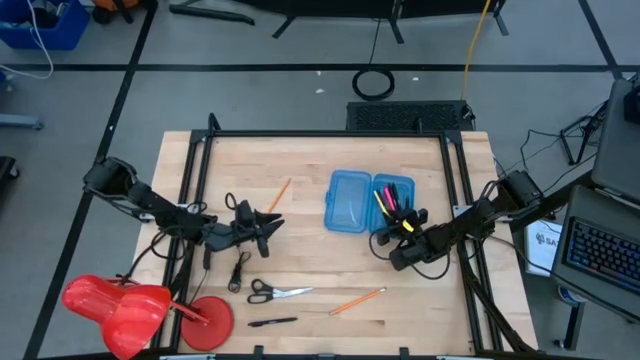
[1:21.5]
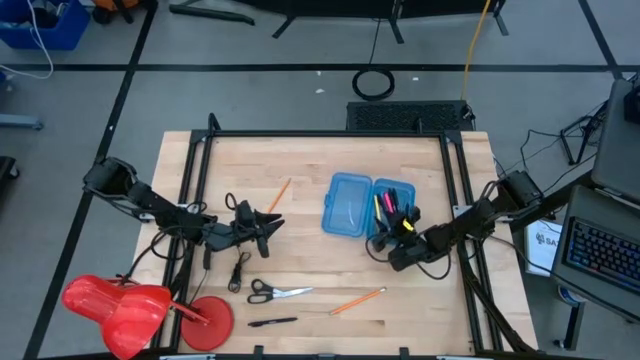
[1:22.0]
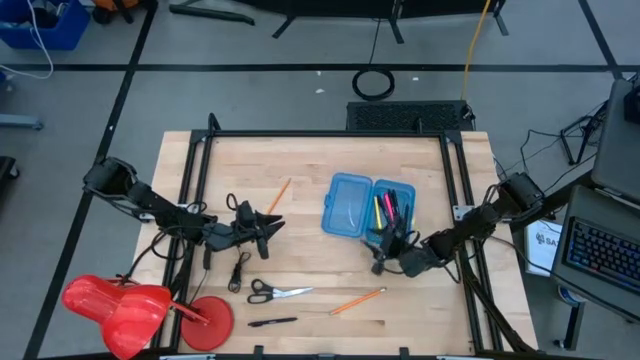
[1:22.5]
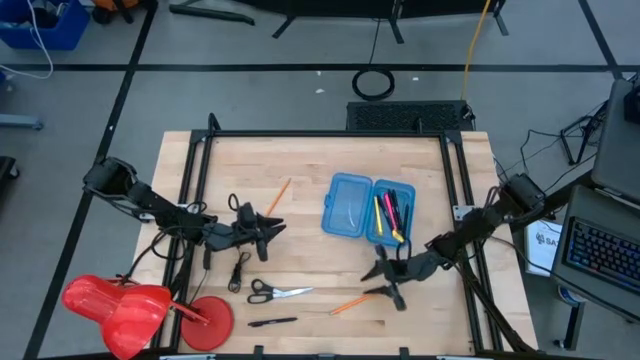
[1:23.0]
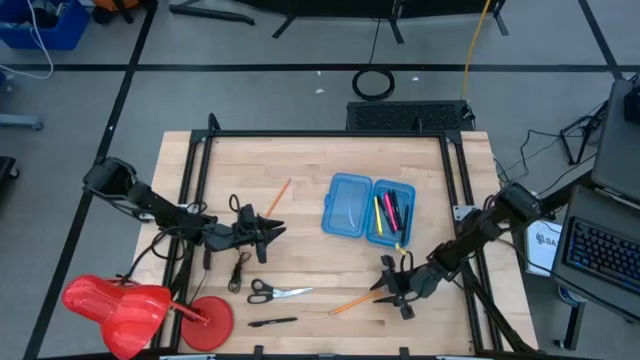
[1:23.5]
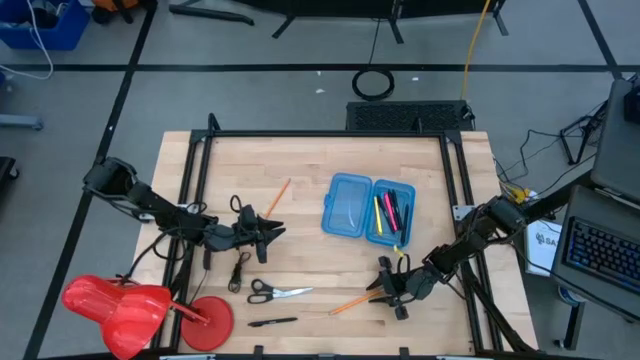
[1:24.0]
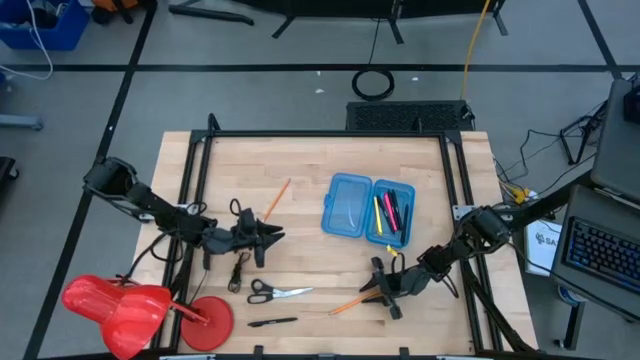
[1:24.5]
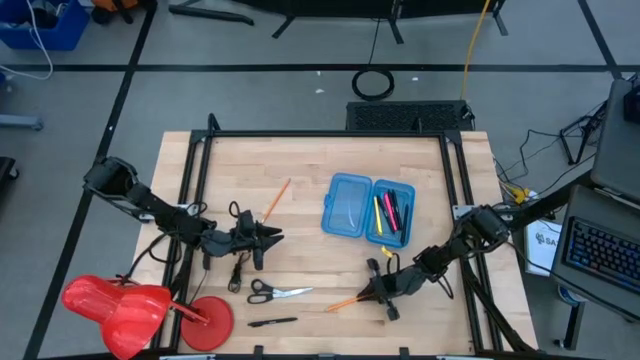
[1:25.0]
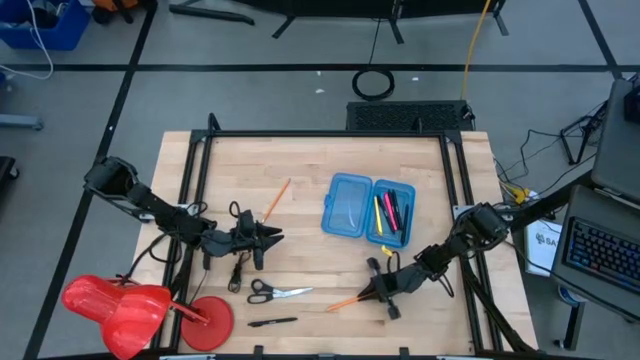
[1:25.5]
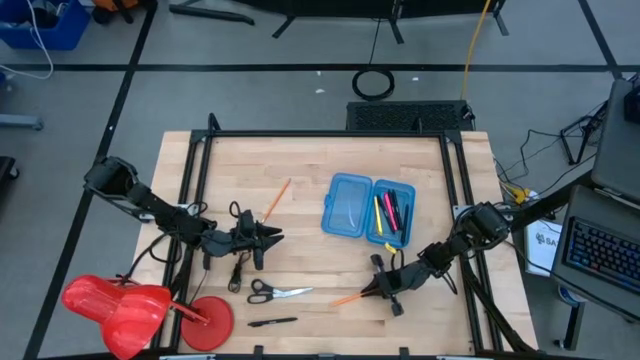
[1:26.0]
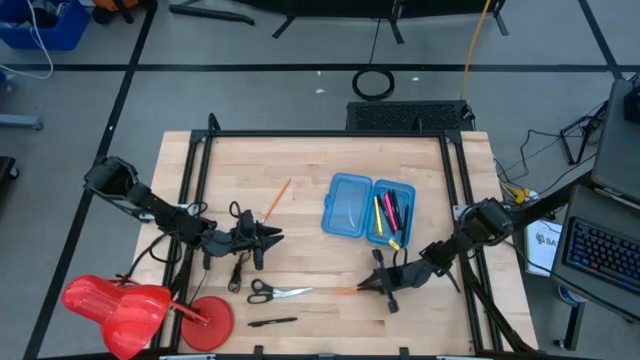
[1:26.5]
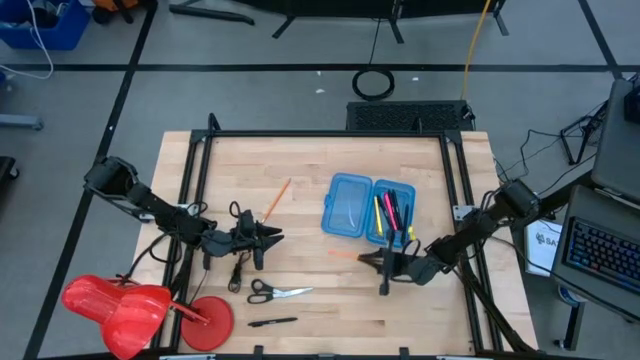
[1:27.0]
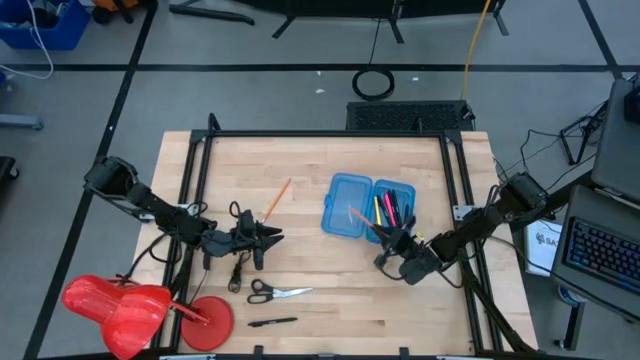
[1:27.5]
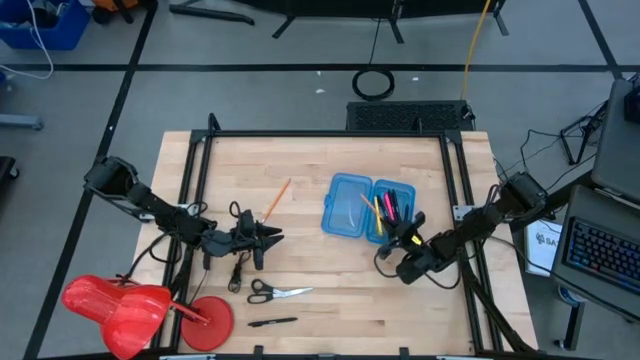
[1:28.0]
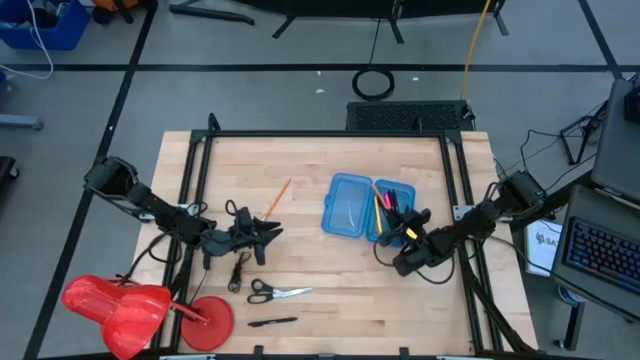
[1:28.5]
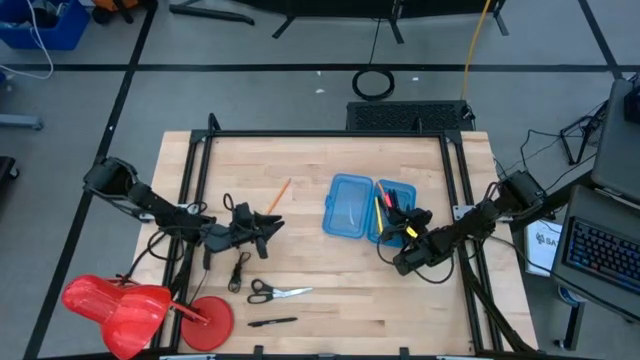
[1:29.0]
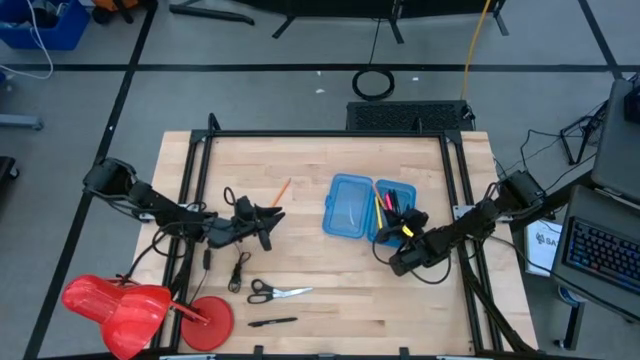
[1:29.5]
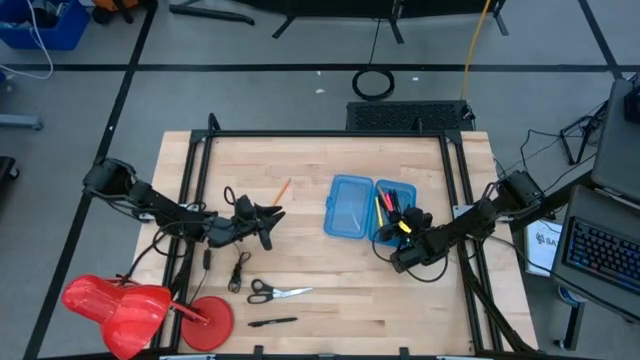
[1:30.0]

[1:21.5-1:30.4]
Task: Pick & place school supplies into a supply box
Put the orange pencil into the blue supply box

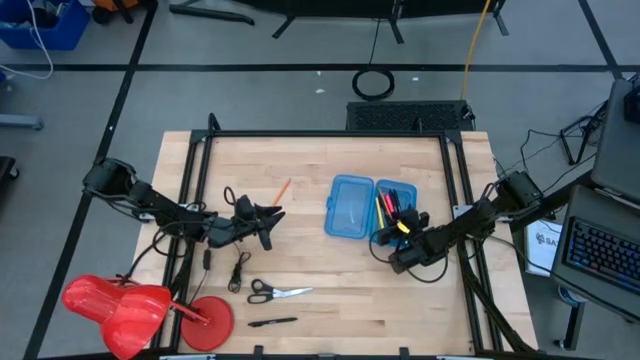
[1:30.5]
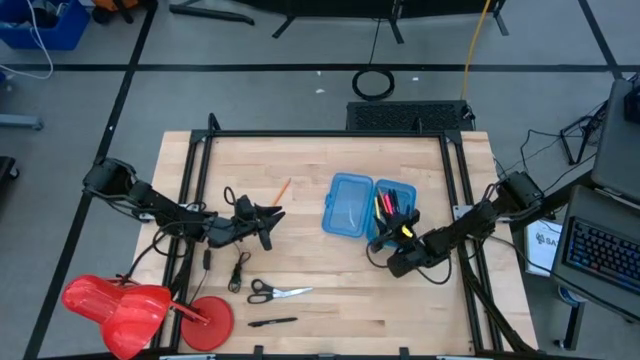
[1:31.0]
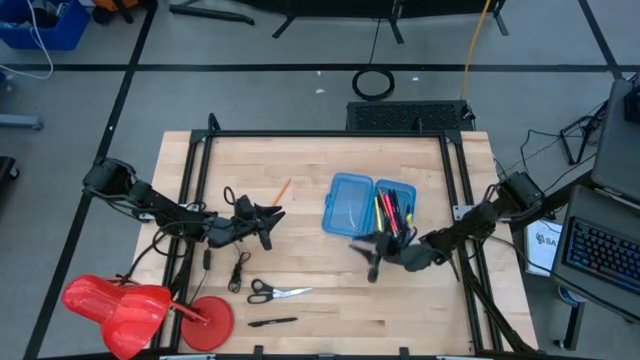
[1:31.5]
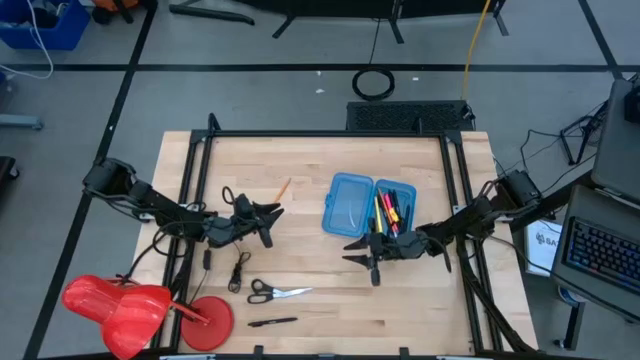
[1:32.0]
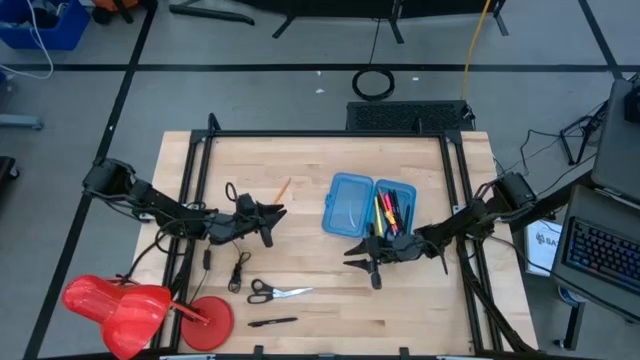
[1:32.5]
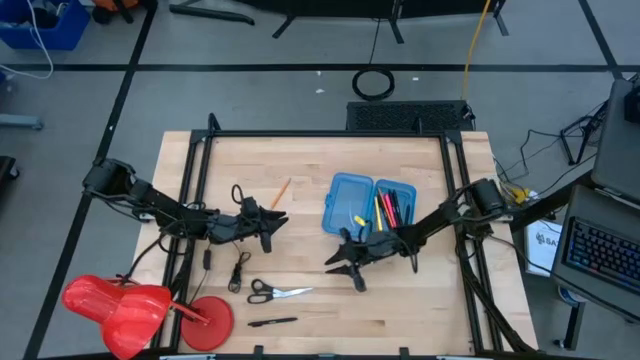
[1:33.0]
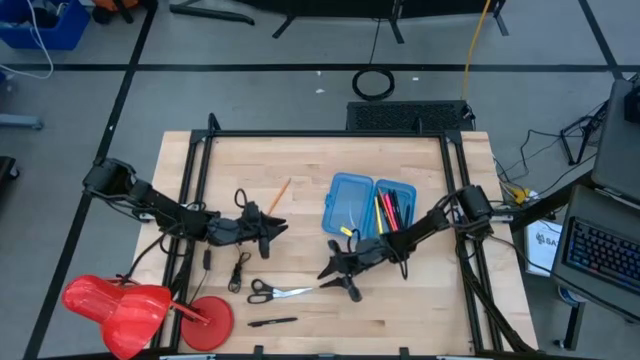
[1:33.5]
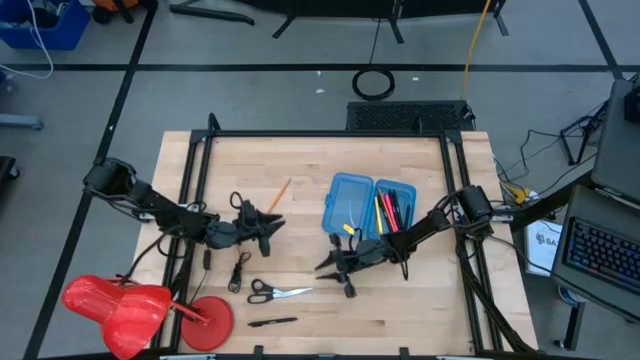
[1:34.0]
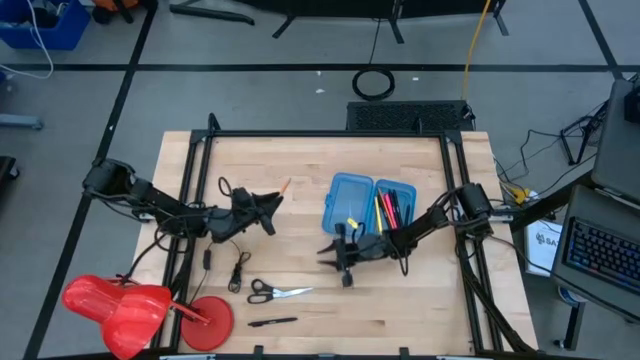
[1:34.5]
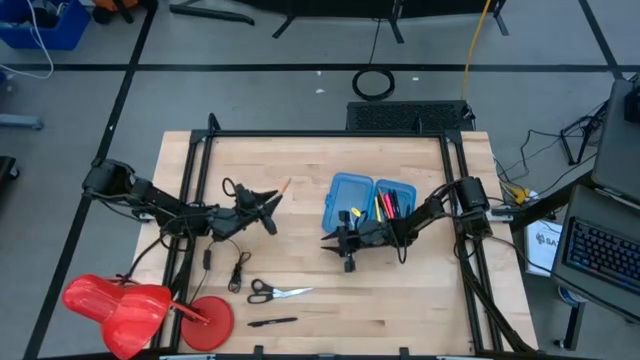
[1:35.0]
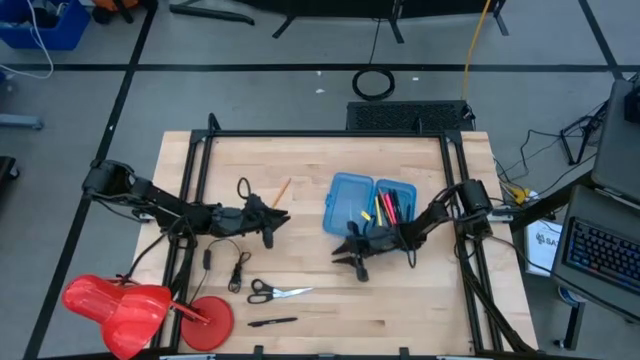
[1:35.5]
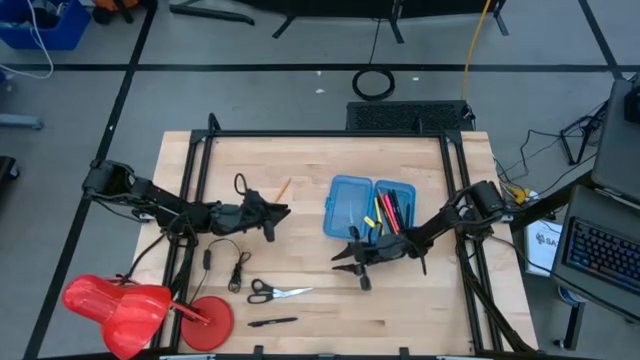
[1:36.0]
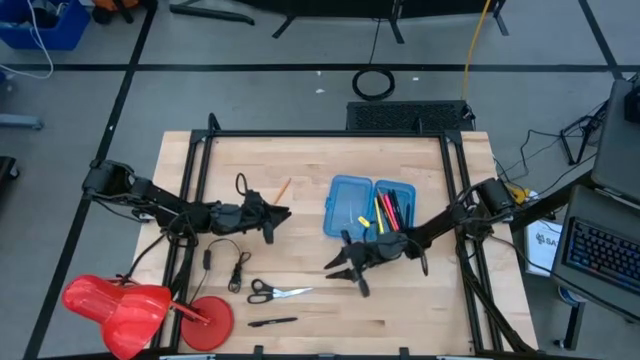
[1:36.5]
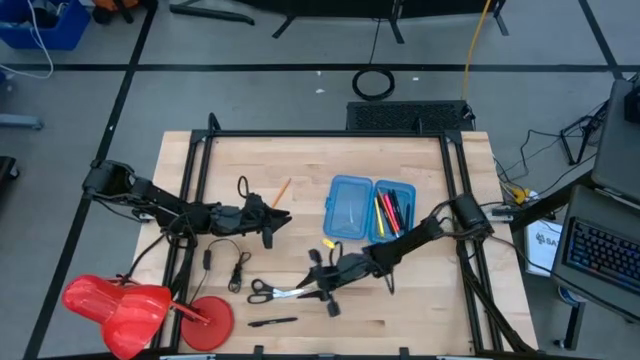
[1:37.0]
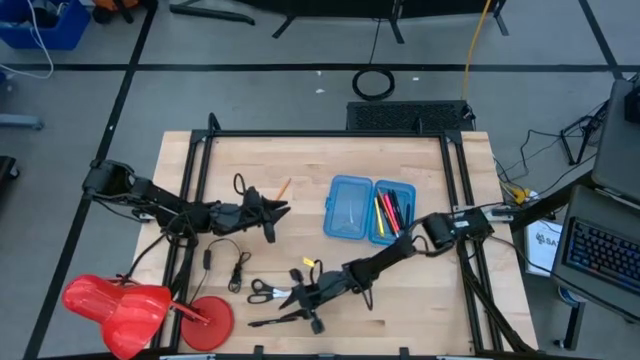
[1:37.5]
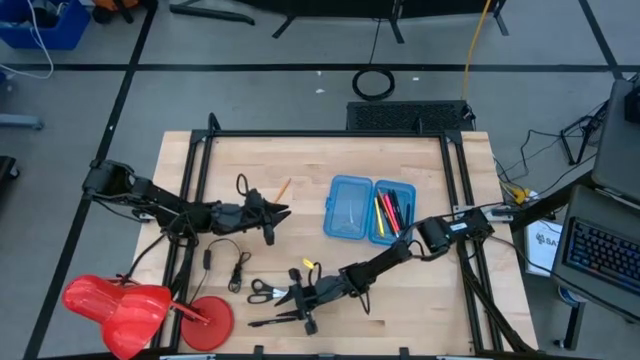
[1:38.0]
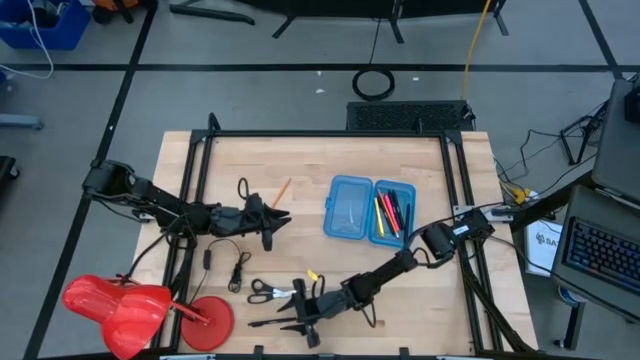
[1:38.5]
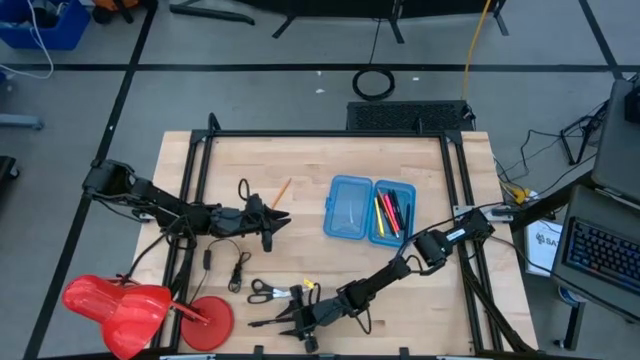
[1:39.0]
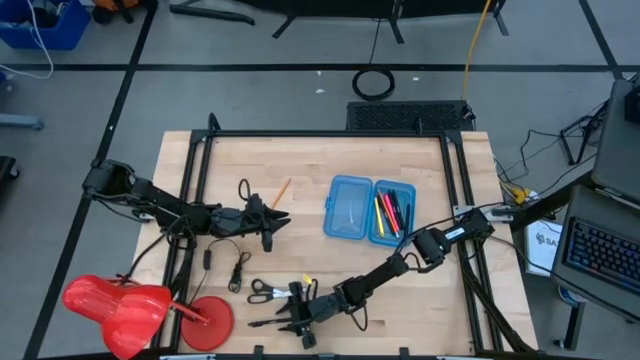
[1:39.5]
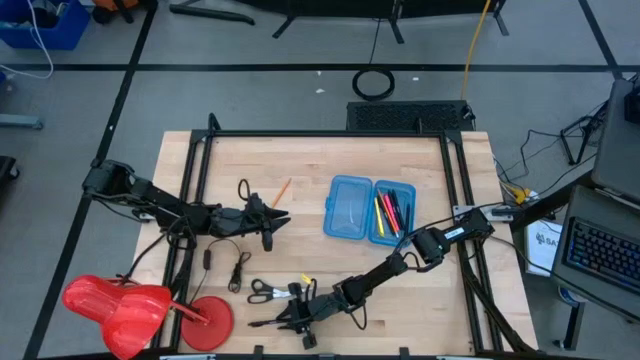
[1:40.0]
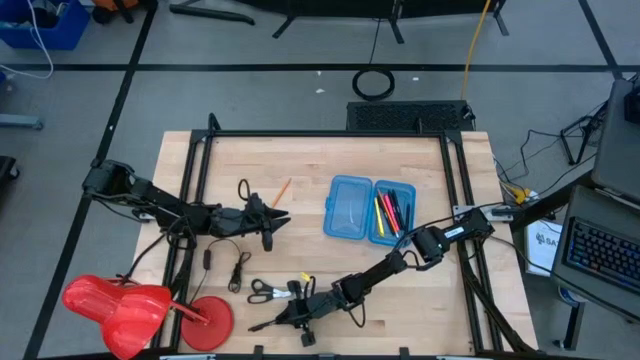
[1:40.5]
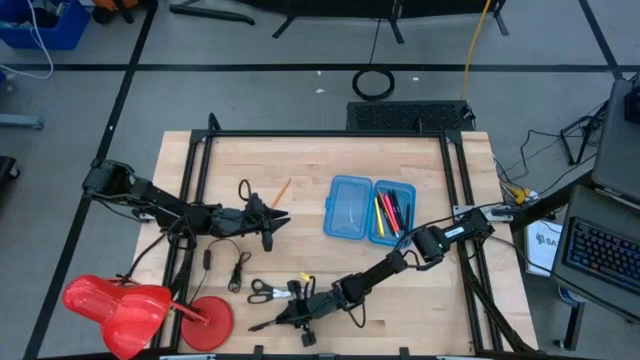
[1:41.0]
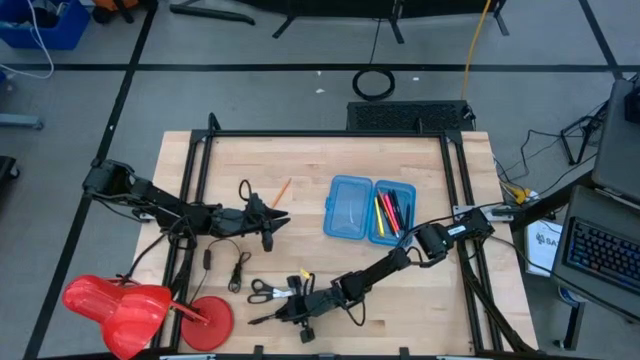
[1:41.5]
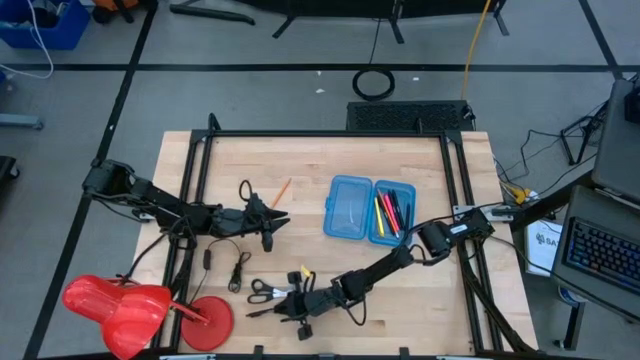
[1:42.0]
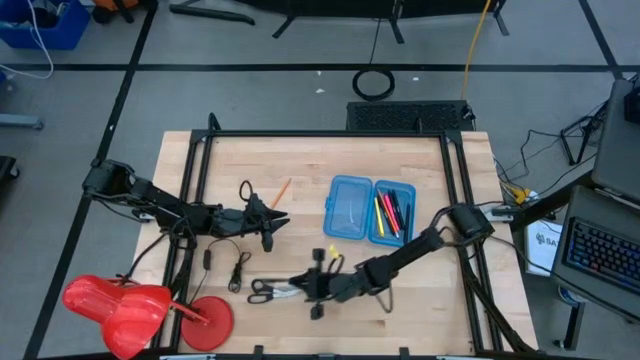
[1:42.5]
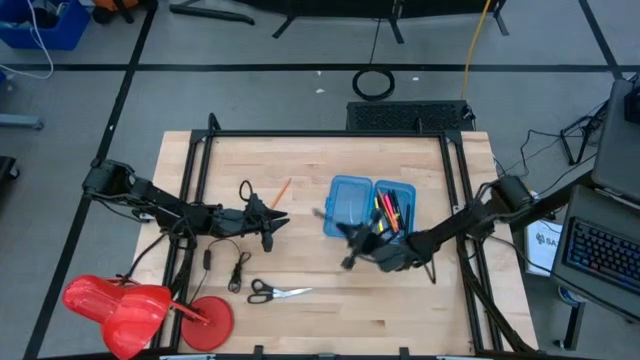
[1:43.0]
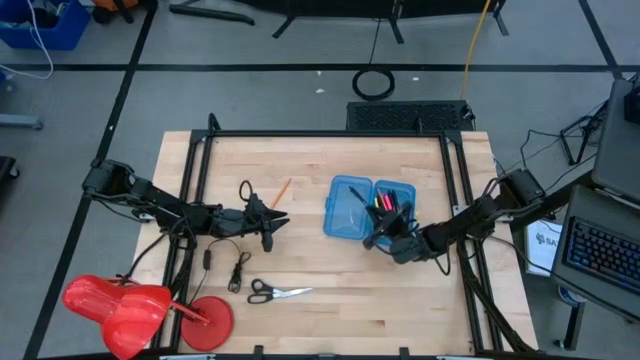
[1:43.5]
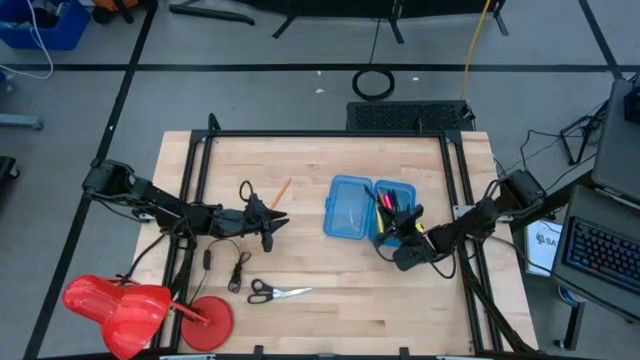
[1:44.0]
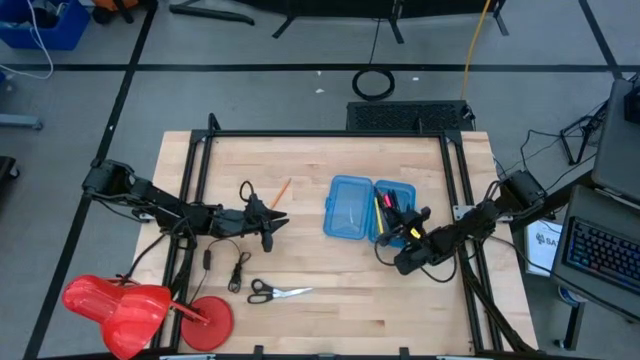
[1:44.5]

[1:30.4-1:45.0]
Put the black pen into the blue supply box
